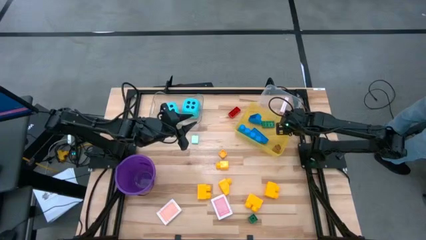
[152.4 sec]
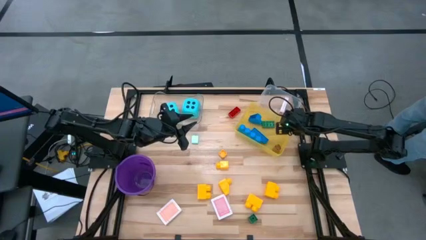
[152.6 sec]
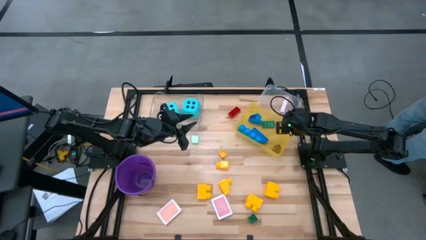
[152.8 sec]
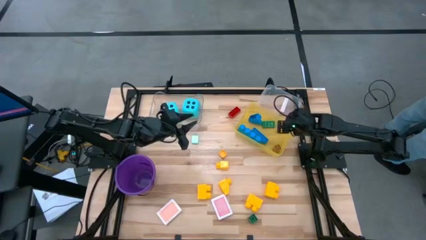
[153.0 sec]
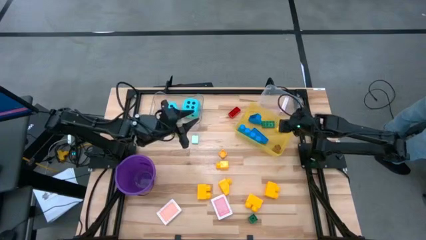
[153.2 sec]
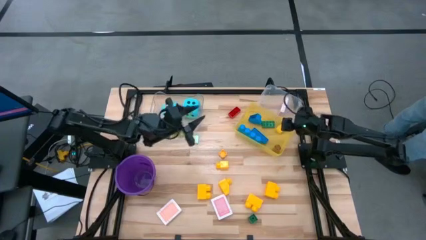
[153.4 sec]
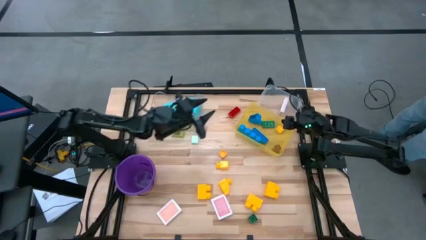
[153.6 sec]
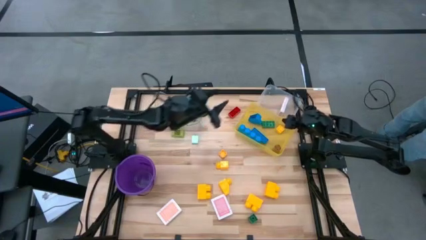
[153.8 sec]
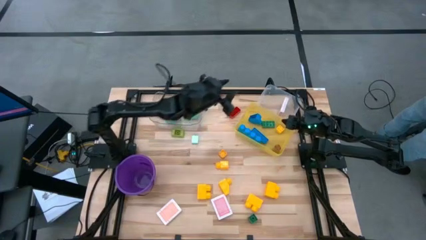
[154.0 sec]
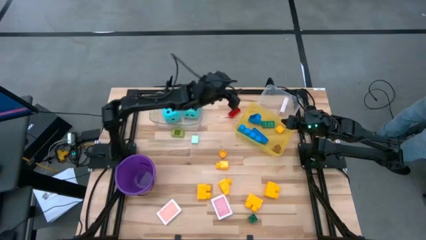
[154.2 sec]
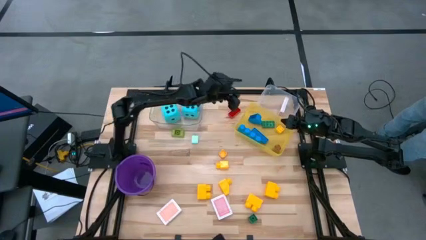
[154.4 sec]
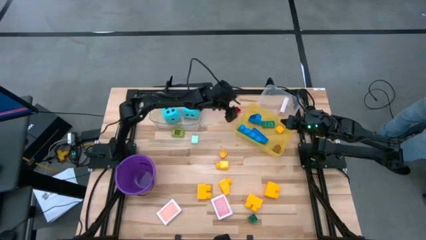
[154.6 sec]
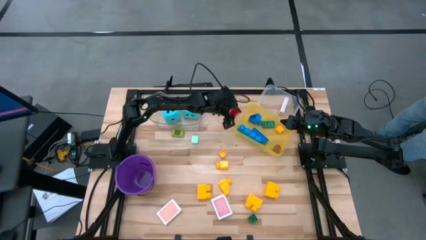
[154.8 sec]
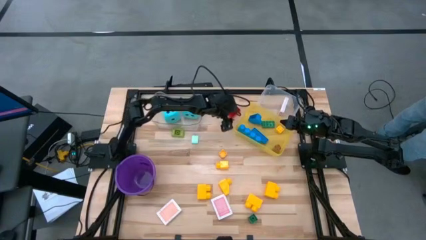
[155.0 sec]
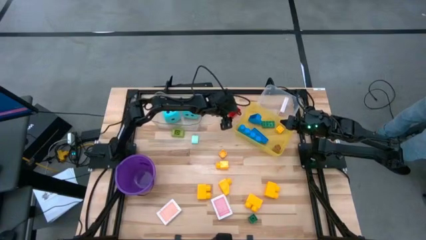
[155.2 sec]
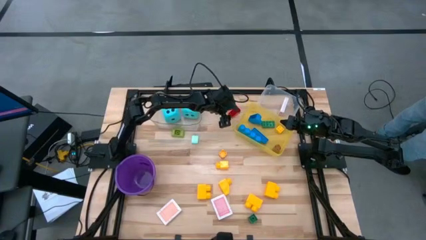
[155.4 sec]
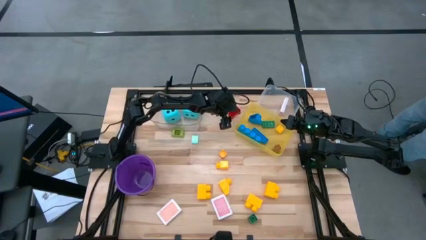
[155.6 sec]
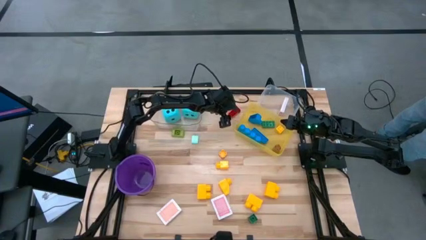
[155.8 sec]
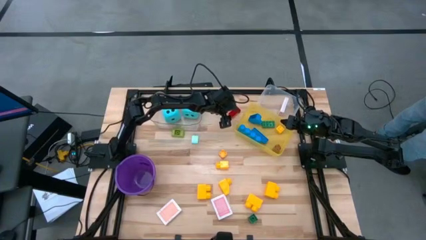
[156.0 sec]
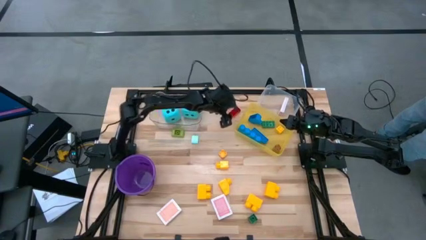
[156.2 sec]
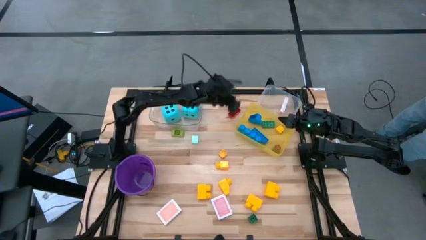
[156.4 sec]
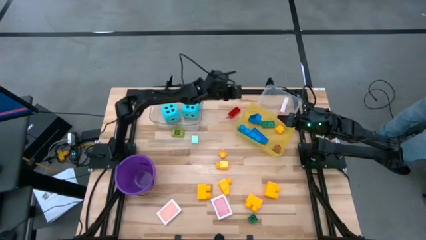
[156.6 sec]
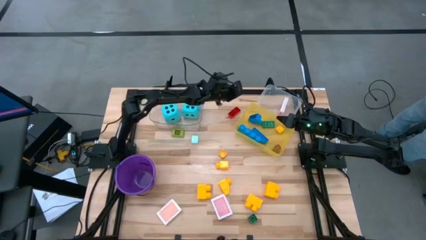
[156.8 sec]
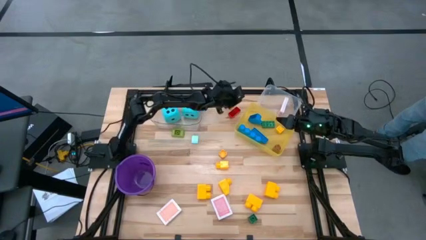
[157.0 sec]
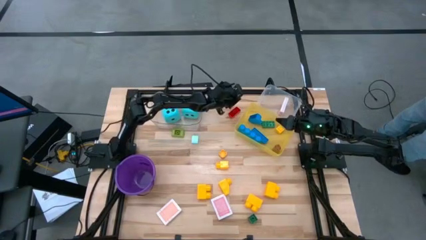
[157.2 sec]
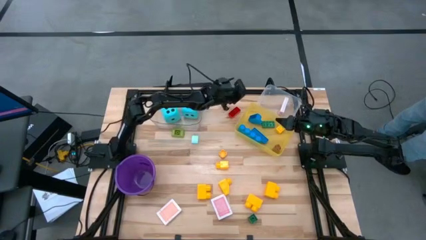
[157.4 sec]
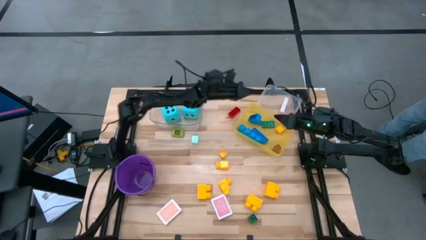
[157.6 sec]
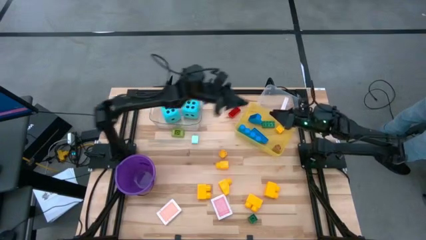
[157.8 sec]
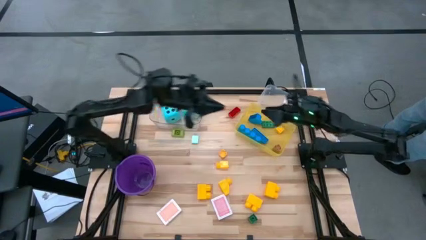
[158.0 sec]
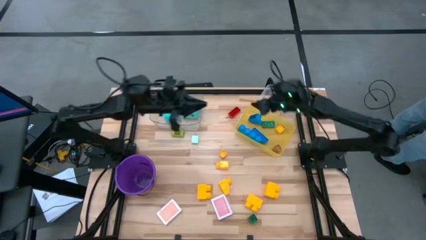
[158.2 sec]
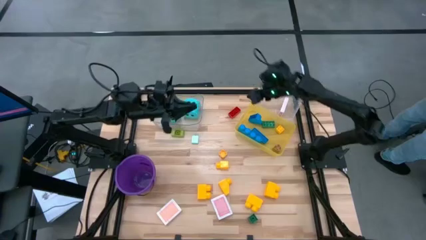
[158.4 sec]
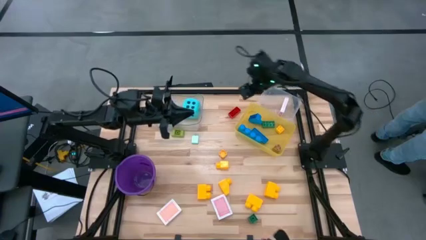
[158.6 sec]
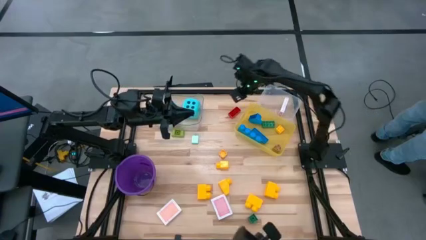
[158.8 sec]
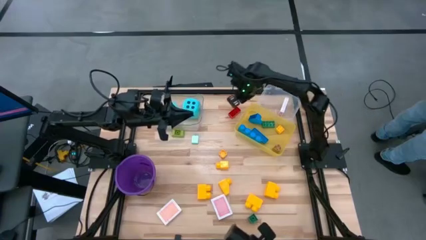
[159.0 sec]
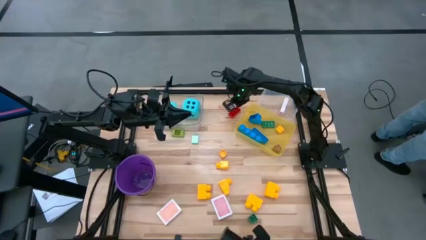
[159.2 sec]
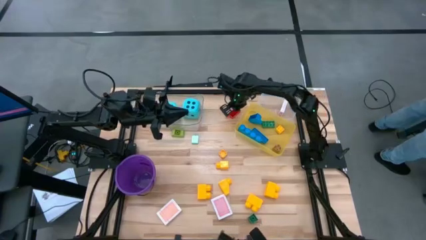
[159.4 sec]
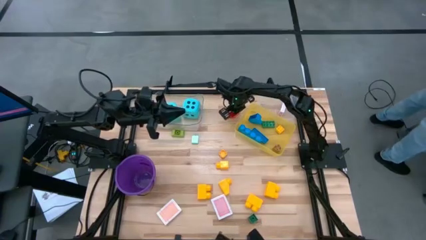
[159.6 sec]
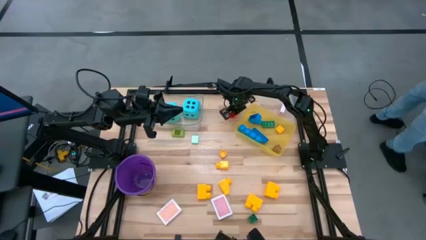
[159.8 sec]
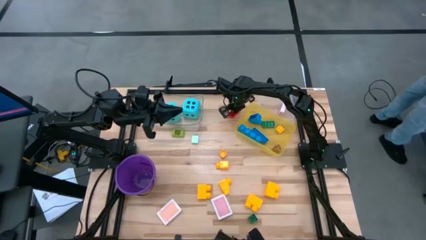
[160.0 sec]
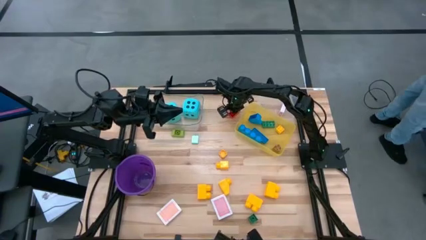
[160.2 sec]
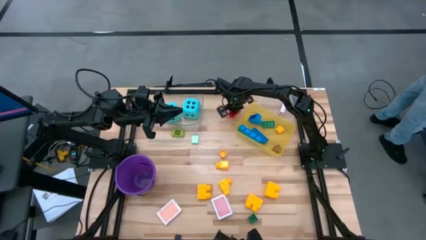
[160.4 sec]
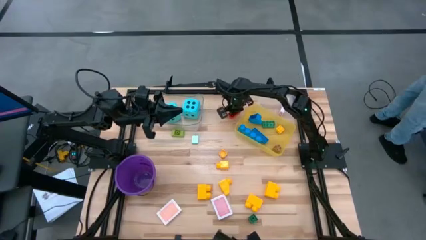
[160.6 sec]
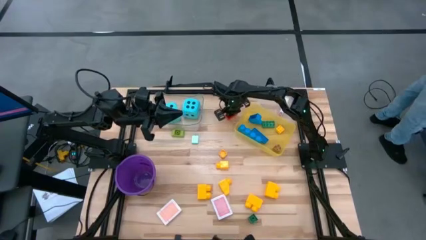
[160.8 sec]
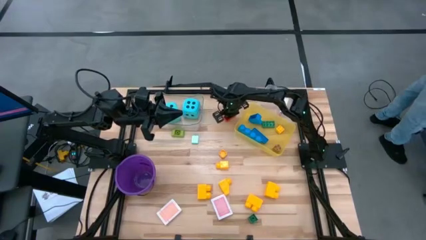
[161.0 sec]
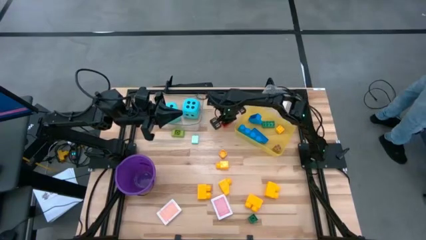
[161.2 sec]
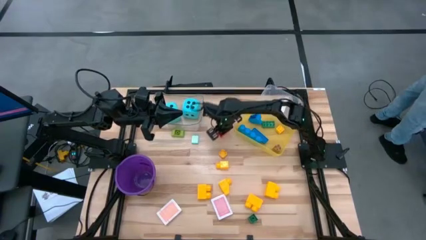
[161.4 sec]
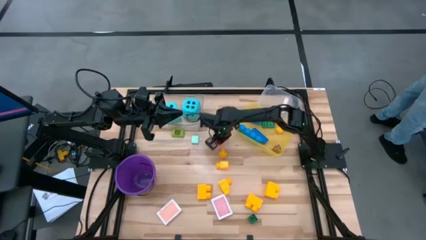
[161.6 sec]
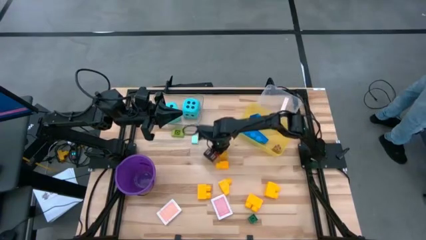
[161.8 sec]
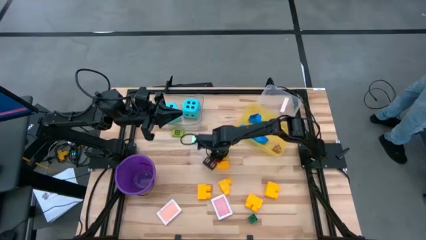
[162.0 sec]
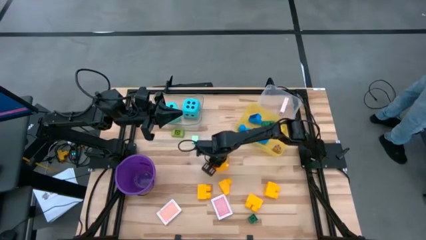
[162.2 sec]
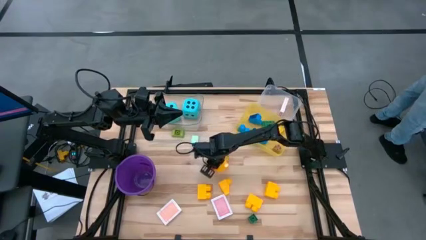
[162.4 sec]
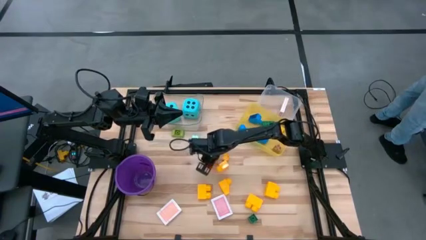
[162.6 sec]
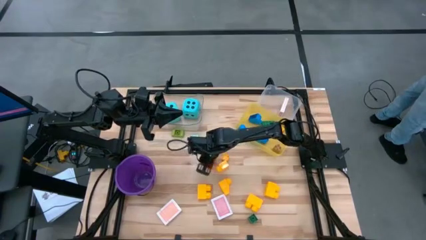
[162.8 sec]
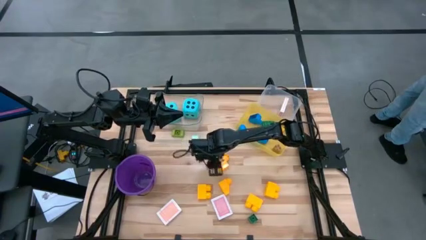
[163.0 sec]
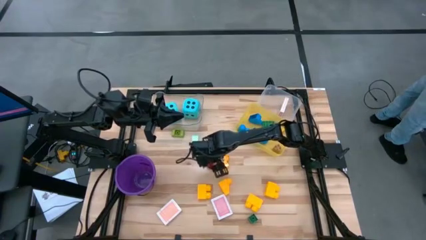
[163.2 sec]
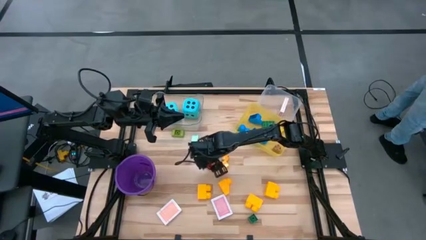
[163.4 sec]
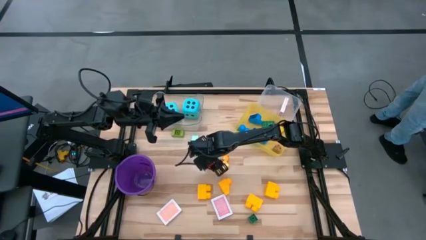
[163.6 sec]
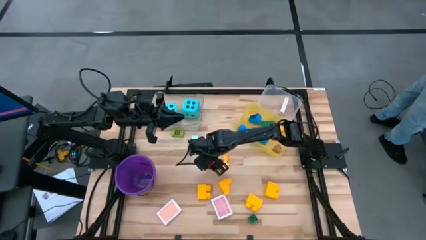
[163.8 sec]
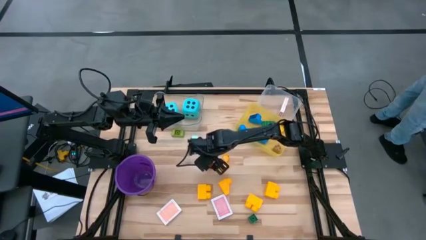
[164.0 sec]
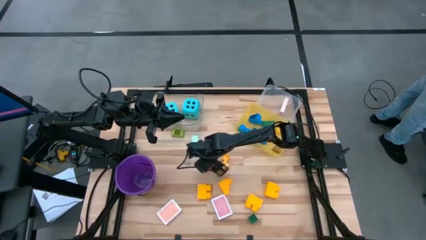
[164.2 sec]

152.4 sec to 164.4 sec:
Task: Pick & Place Toys
Put the red game piece into the yellow bin

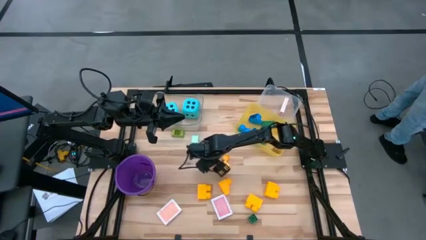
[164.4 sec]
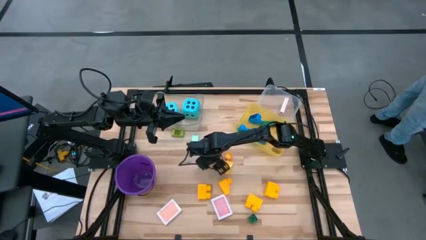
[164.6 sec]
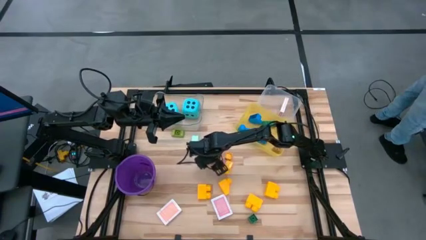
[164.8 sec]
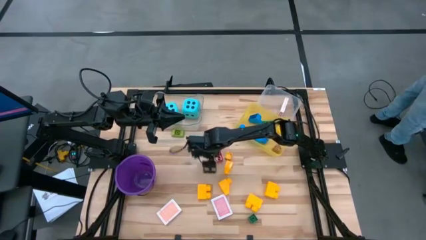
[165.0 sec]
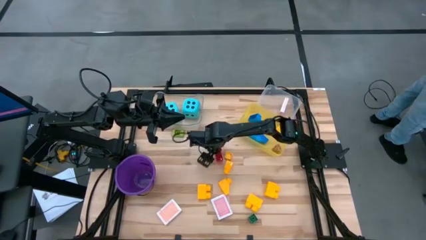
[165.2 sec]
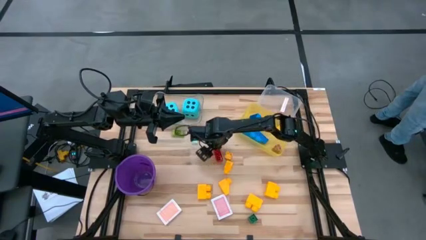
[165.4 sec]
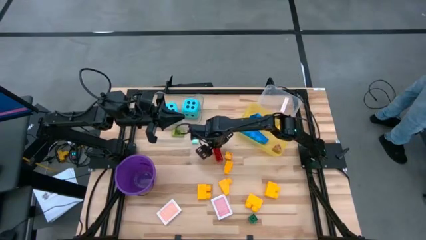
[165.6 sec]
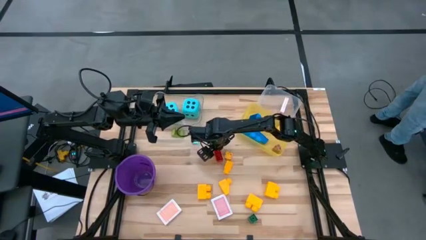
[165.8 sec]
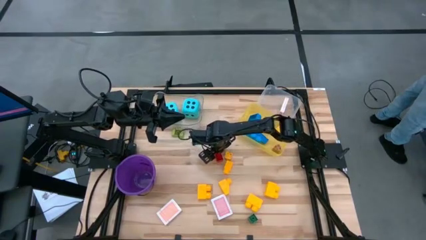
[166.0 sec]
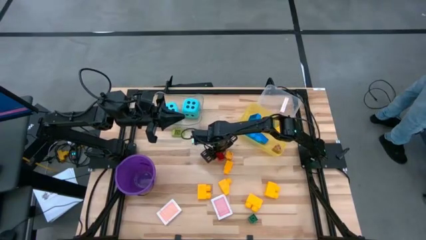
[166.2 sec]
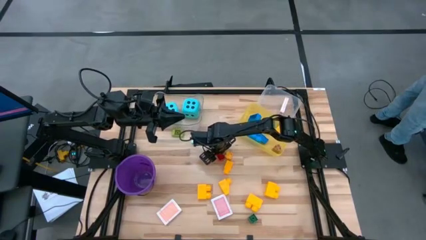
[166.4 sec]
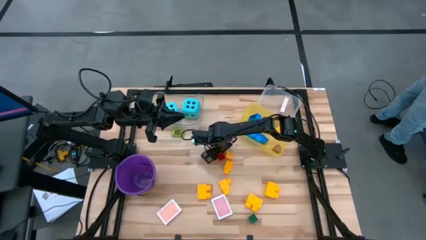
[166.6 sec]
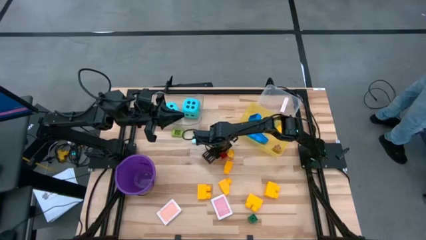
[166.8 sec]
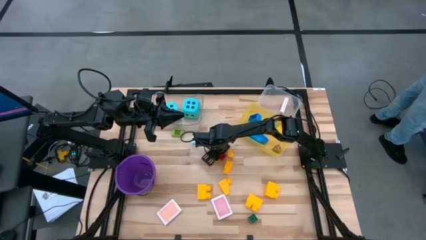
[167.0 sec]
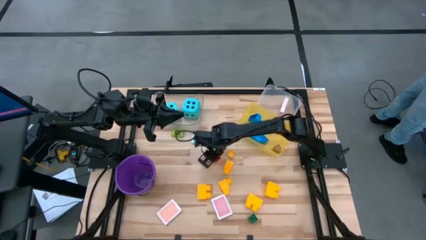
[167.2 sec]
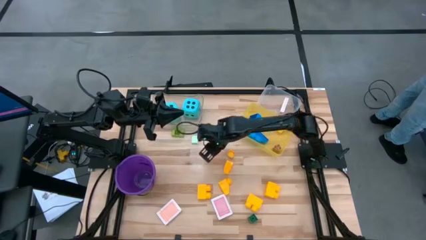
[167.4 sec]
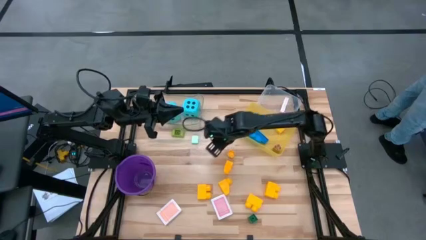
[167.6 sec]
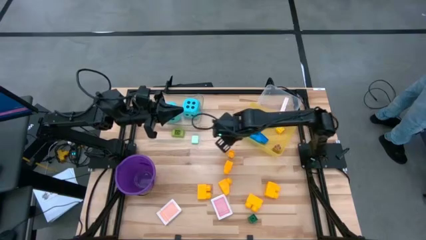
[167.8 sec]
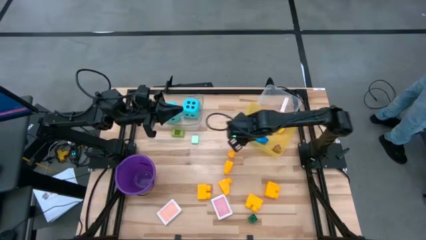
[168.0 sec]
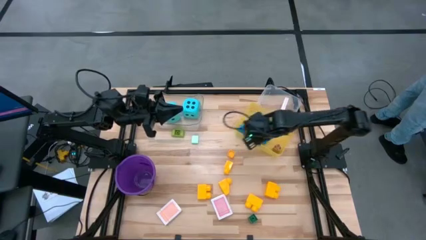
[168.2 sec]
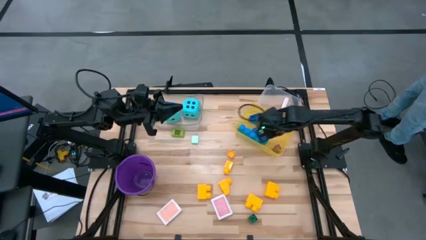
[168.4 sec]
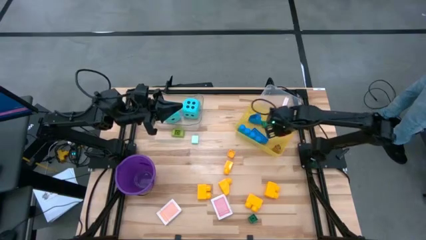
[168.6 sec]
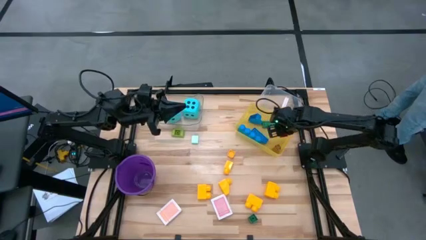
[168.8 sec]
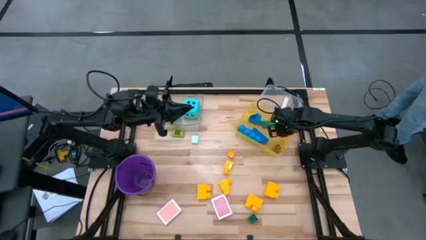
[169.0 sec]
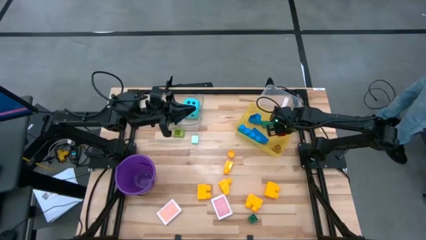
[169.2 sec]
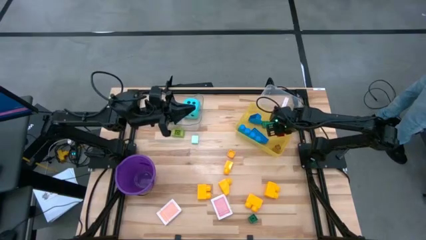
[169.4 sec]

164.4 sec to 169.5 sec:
Put the red game piece into the yellow bin
